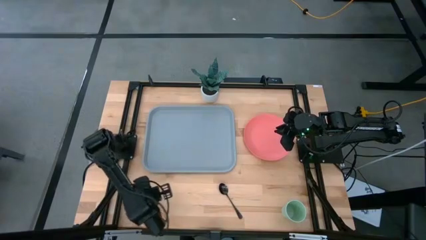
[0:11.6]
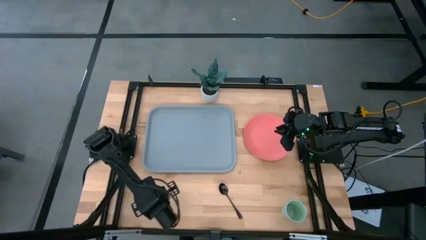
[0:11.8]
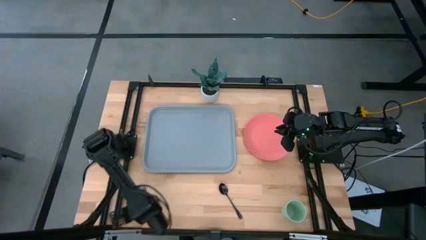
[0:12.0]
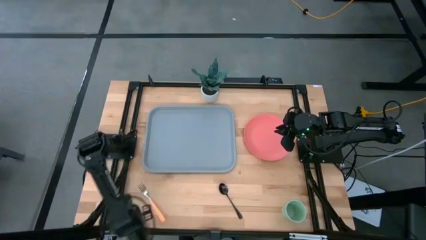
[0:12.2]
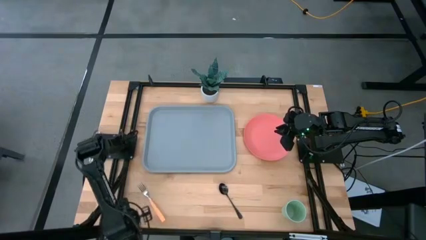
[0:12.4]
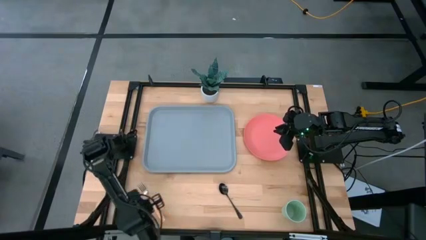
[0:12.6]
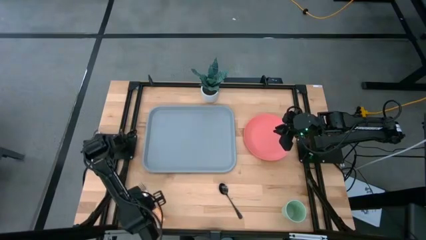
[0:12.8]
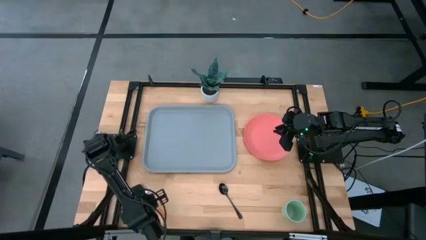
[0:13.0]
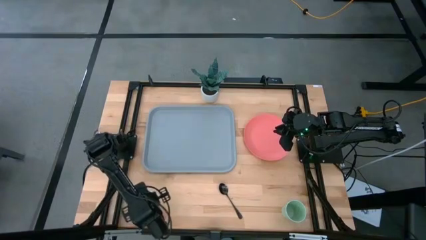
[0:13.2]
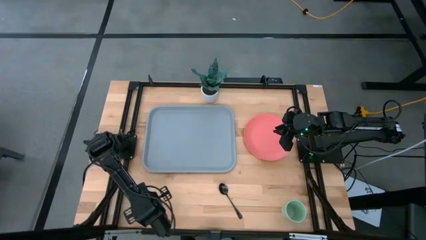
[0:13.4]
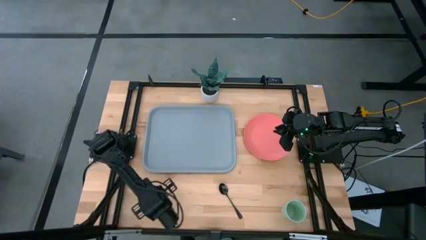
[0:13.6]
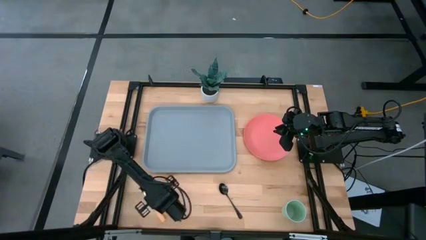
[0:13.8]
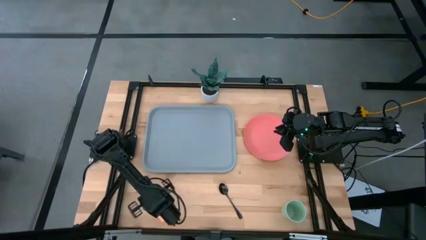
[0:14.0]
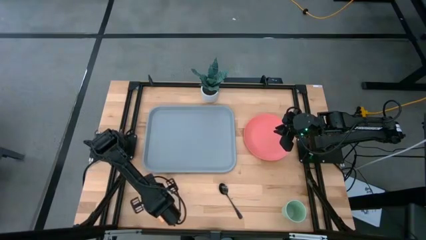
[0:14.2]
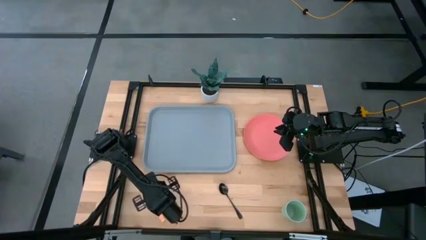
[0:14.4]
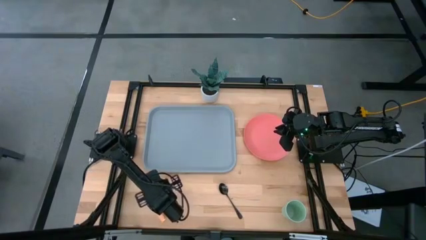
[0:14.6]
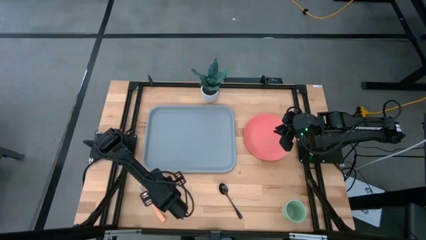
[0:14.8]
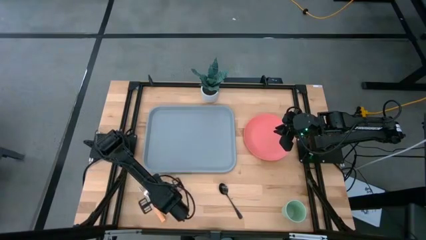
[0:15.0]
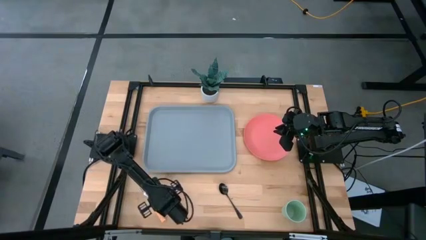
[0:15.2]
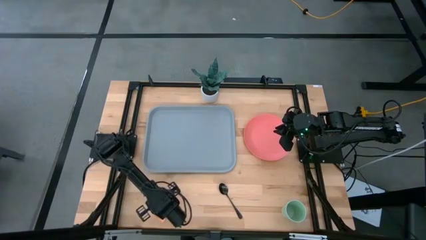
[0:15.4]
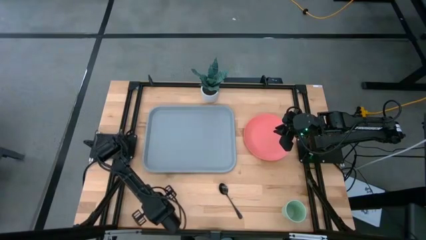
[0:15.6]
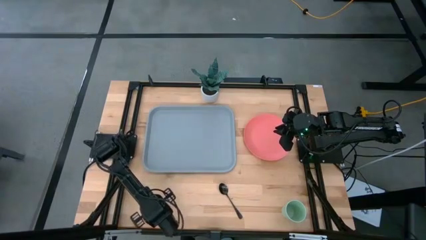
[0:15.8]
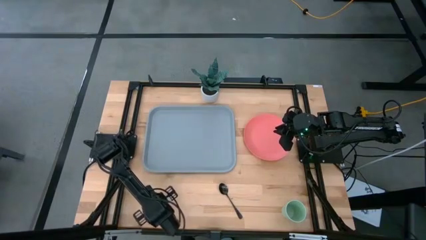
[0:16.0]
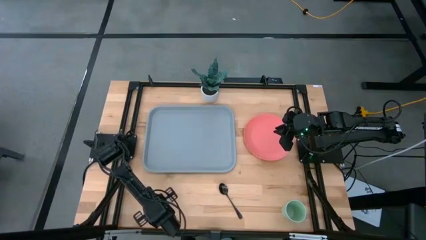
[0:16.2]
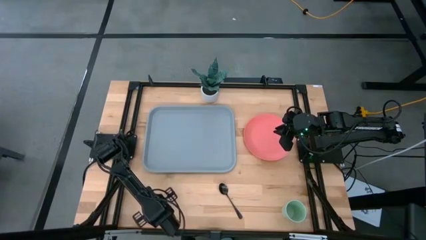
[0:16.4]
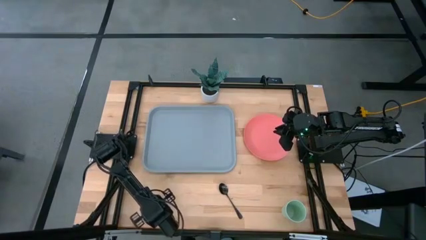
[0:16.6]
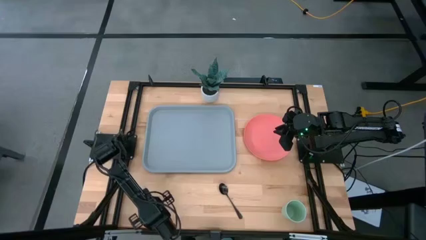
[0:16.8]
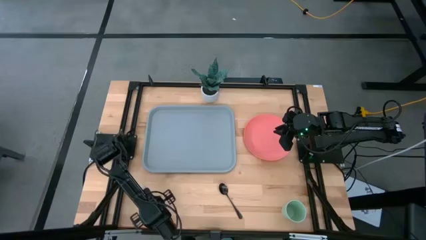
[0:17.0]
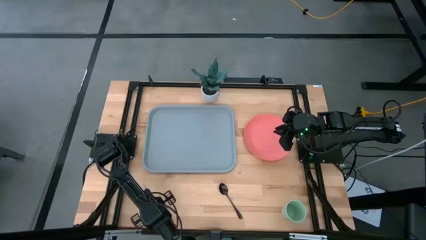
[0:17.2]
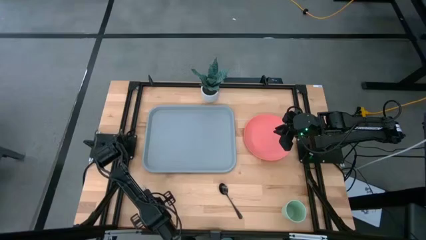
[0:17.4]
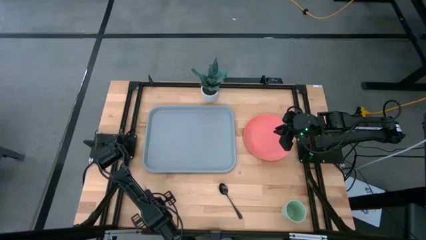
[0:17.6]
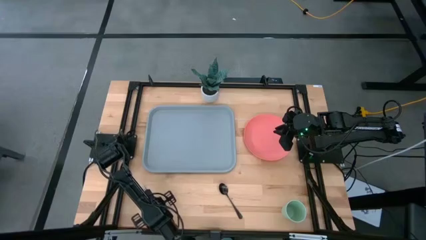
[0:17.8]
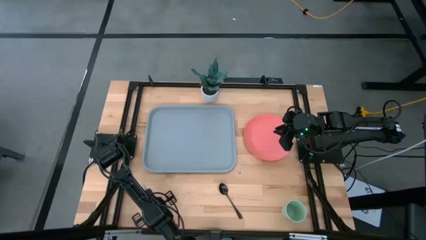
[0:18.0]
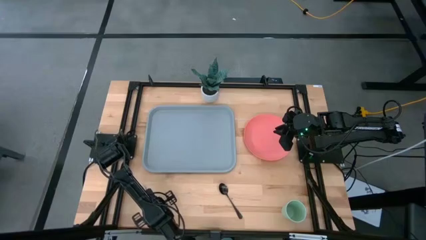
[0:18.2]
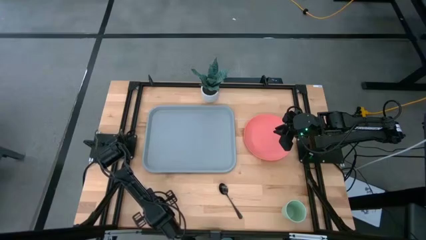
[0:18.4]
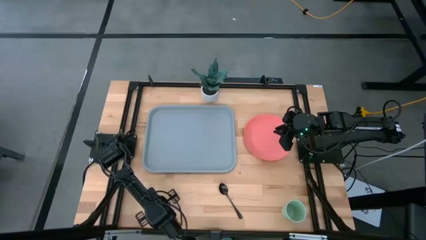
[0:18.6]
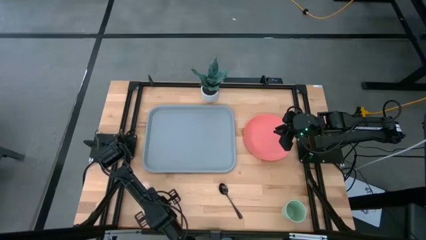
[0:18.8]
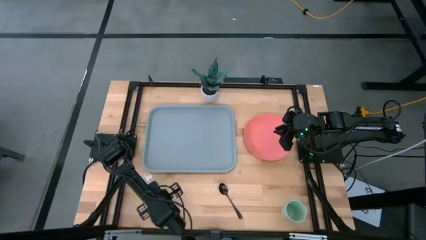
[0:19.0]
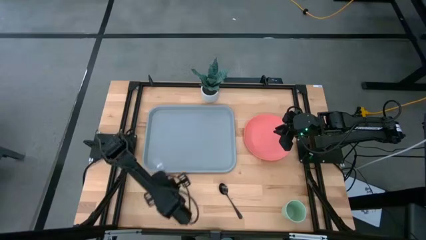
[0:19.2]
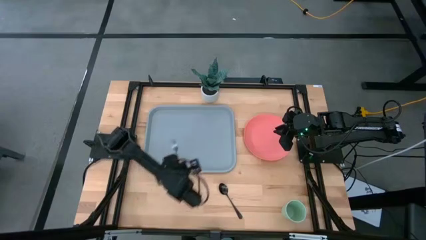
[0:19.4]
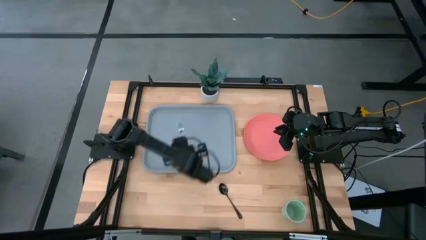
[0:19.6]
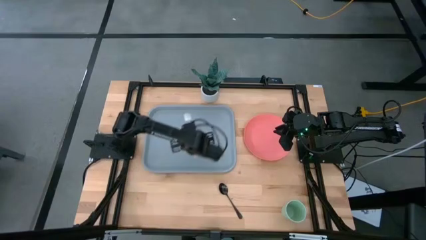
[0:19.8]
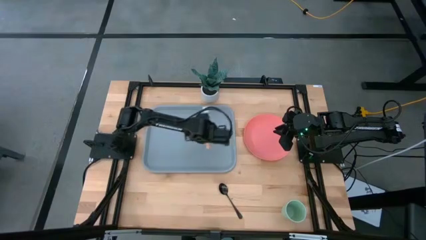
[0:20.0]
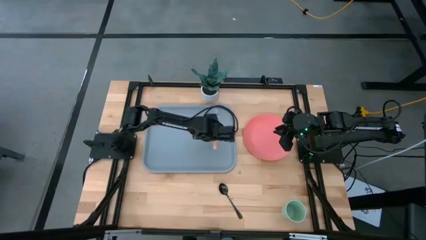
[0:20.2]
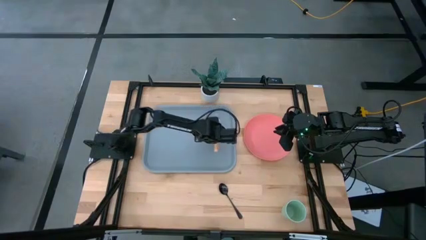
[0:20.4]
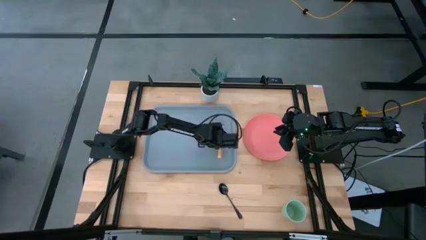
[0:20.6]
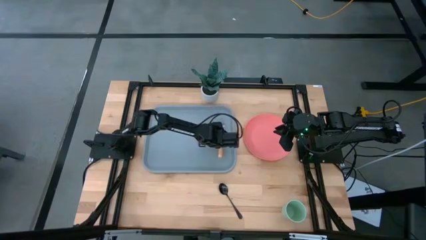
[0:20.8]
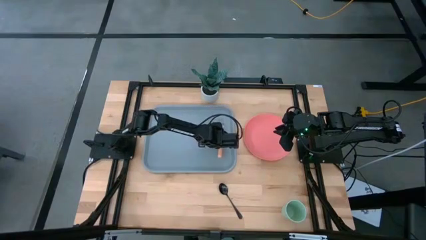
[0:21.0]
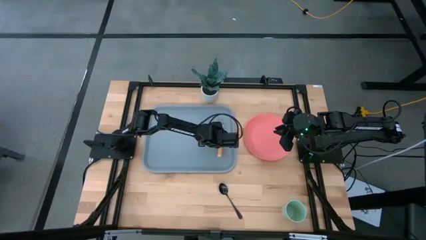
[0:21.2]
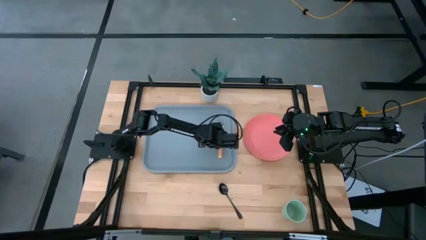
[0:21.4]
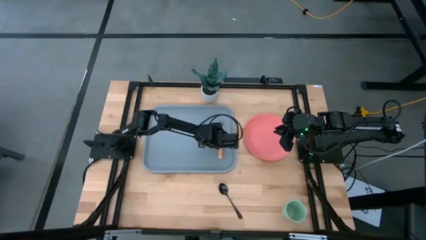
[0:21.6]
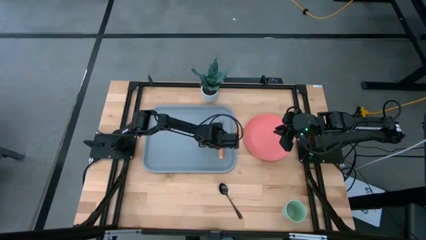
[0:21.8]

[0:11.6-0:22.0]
Task: Pick and place plate/cup/fork/spoon on tray
Put the fork on the blue tray

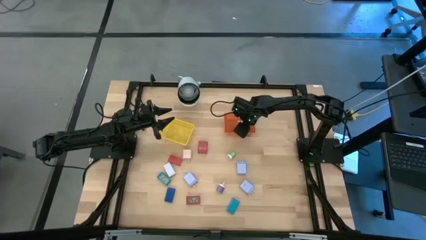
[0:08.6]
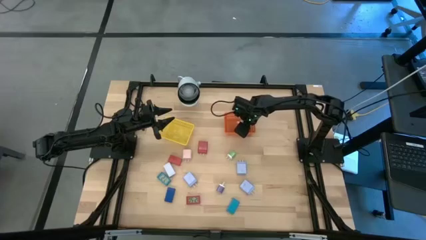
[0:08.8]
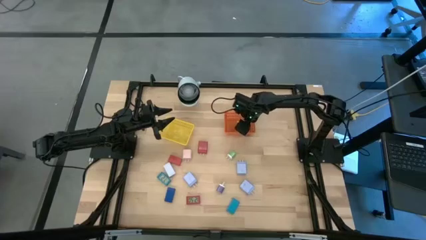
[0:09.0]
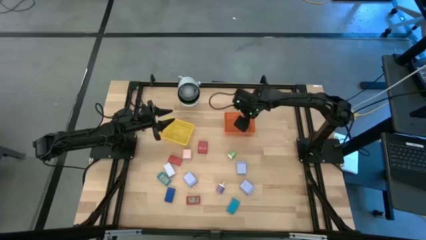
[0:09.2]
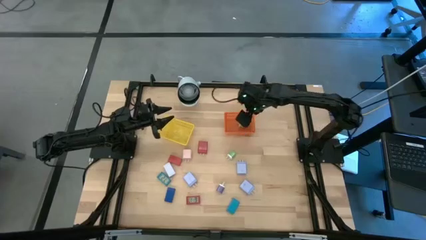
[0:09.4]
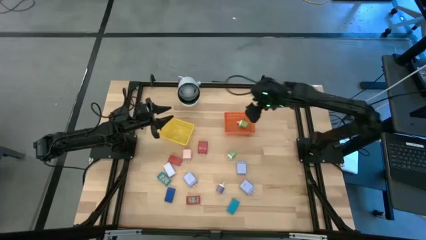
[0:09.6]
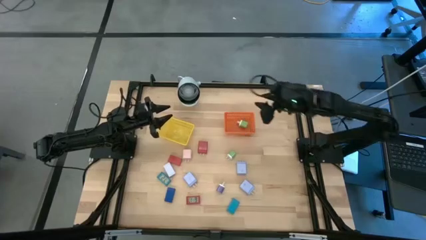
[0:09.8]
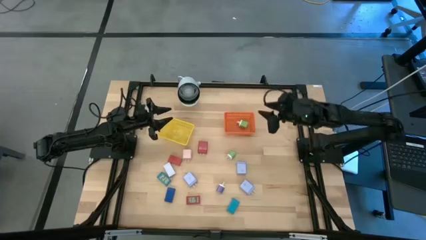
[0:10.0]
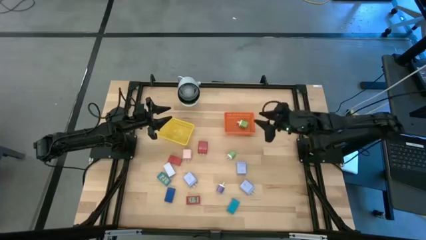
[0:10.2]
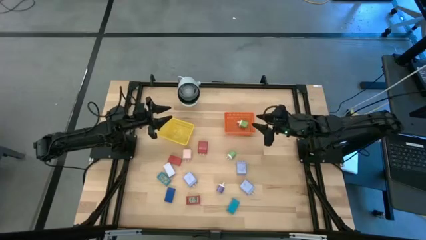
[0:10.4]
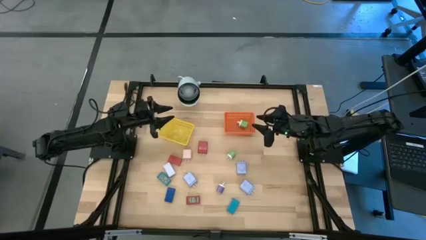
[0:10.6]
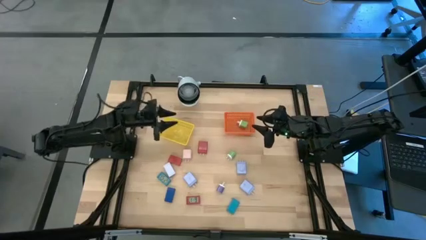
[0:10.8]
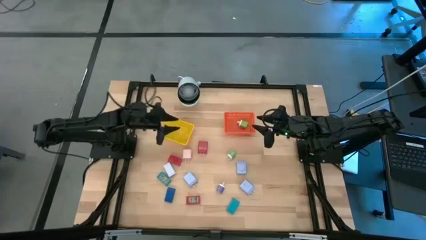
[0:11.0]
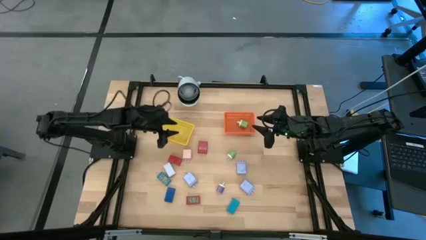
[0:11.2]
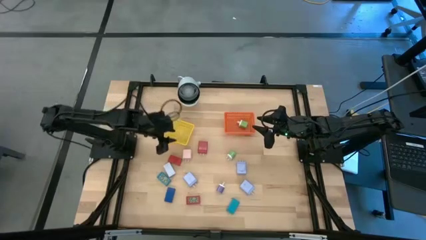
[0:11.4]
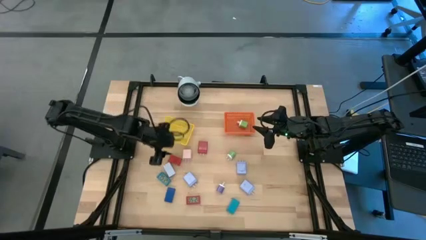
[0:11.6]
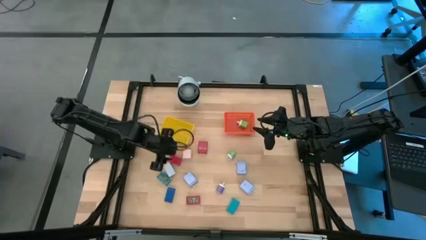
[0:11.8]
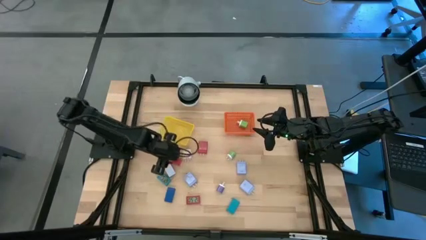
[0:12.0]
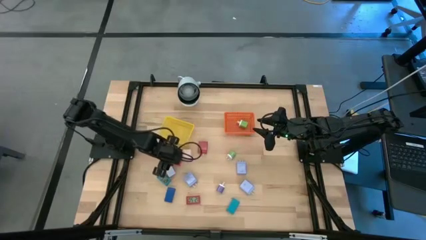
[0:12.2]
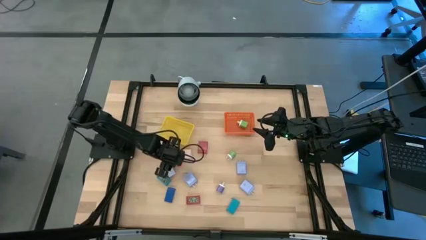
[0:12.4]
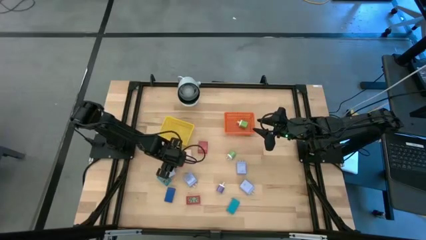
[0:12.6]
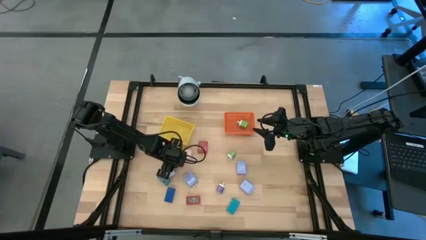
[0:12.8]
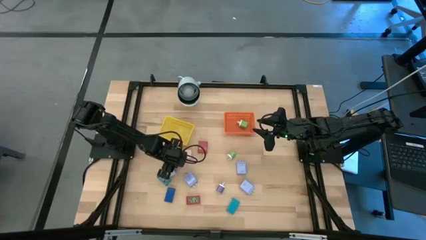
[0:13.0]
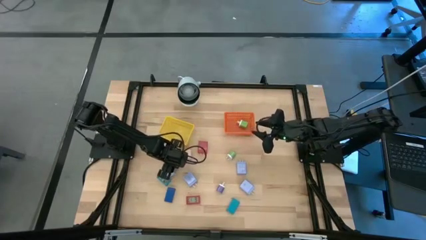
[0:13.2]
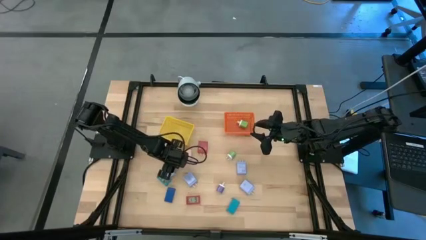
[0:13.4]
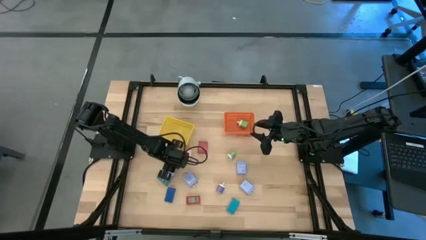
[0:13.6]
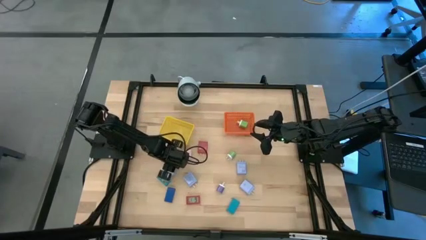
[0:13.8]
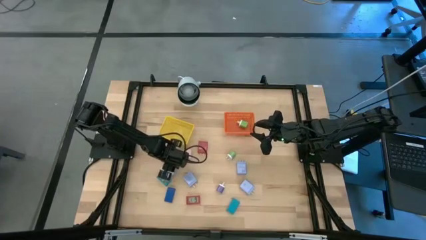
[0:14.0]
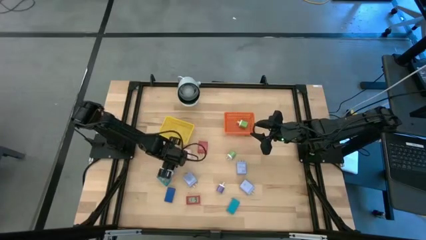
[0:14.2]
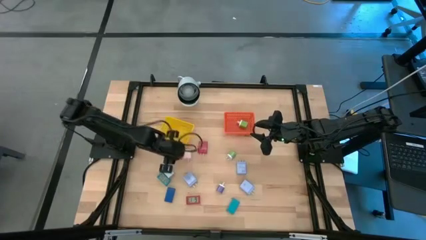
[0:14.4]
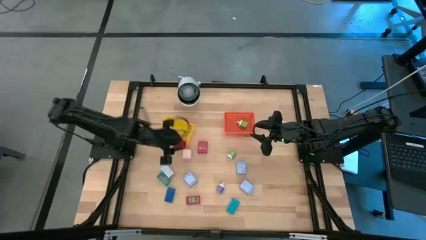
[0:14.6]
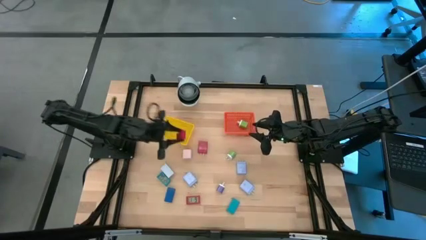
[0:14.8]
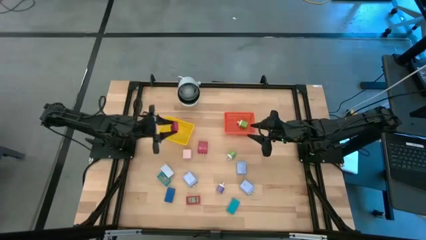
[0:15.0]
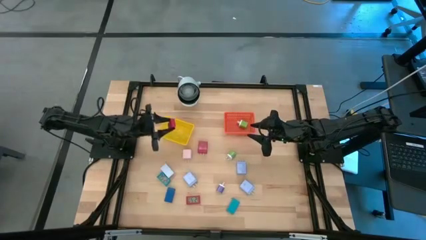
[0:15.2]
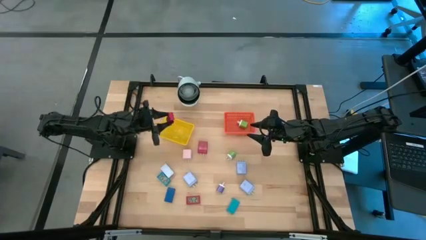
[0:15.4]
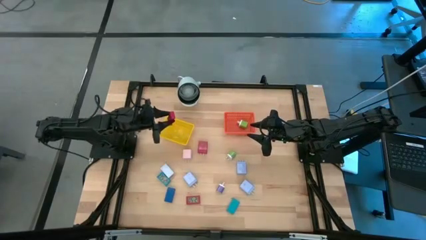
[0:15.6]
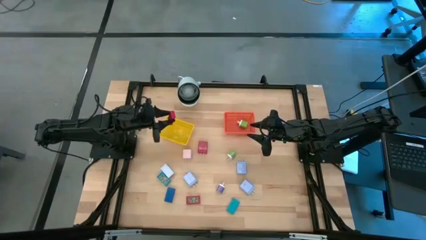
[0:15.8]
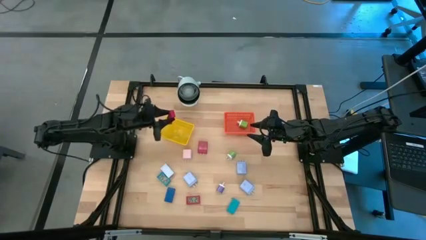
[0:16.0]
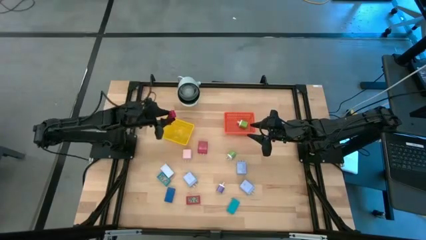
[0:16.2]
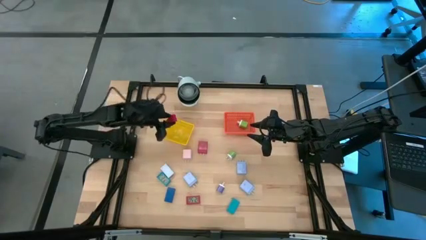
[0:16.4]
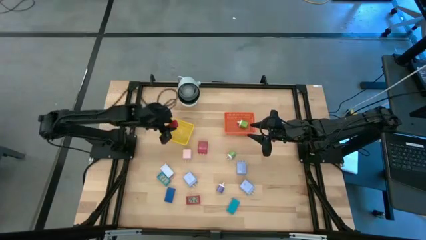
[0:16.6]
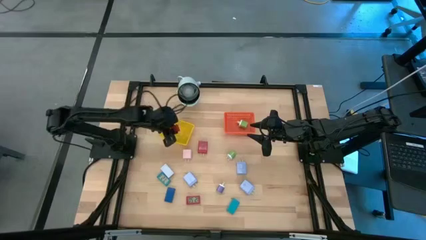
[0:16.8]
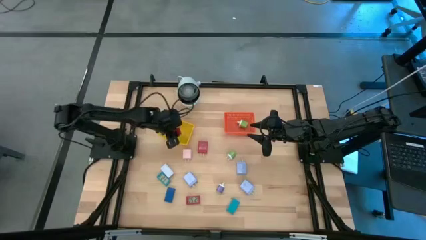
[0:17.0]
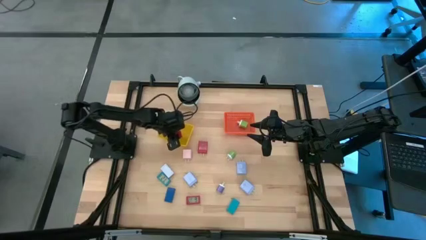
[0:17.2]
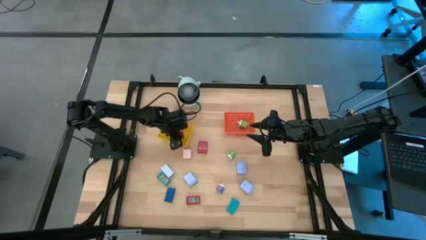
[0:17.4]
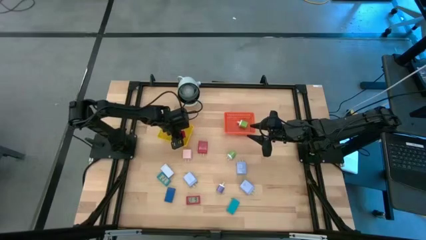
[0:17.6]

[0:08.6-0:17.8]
Task: Pick & Place Office items
Put the top red digital timer into the yellow bin
